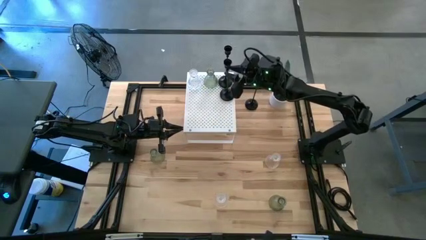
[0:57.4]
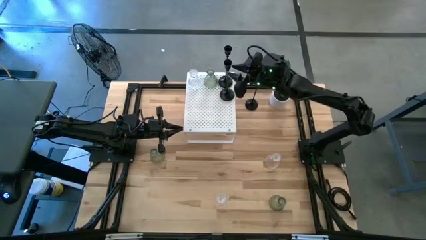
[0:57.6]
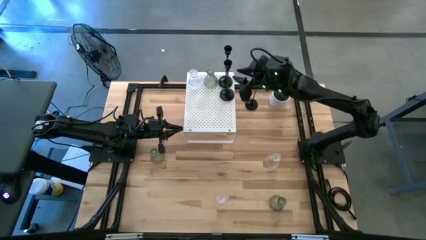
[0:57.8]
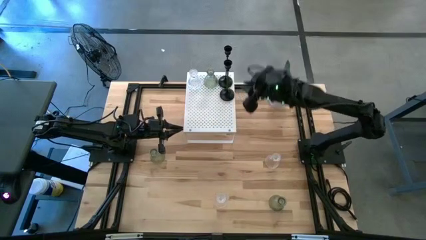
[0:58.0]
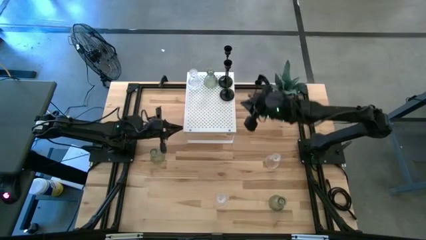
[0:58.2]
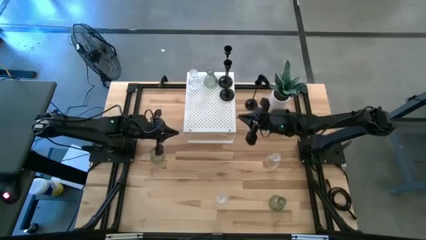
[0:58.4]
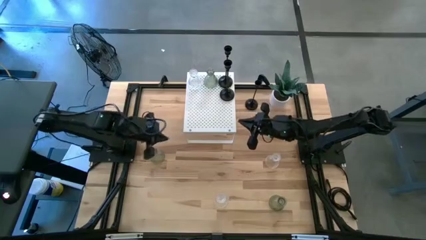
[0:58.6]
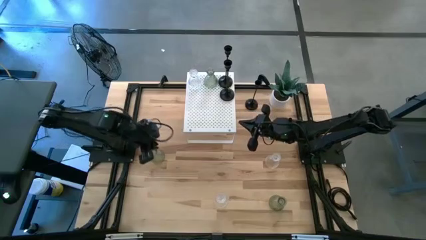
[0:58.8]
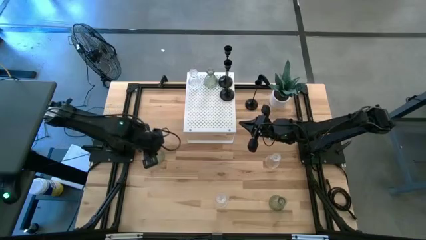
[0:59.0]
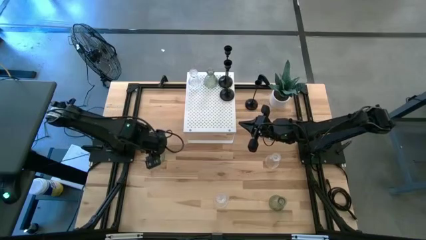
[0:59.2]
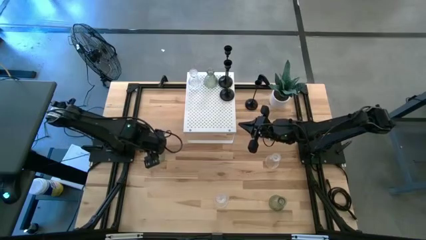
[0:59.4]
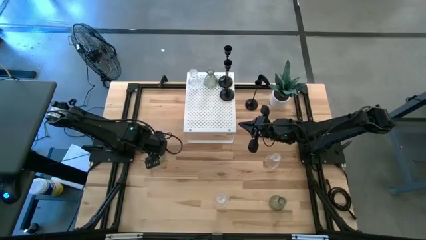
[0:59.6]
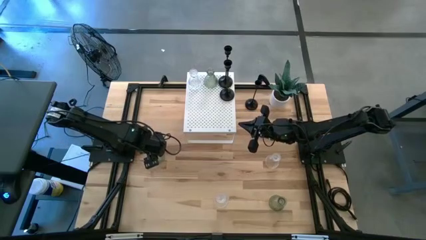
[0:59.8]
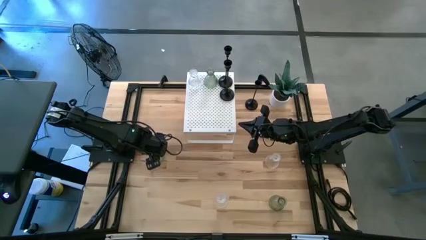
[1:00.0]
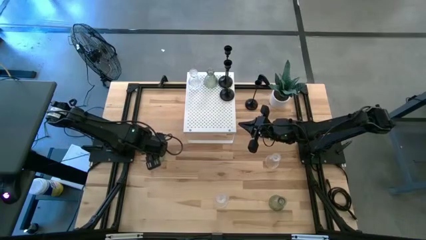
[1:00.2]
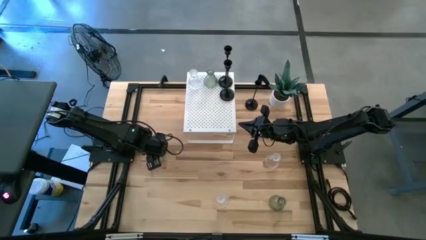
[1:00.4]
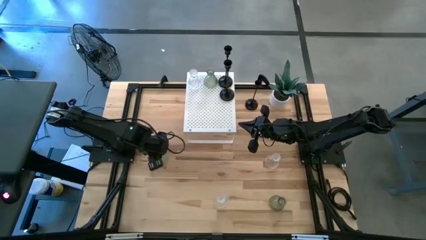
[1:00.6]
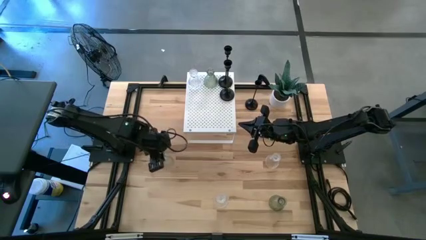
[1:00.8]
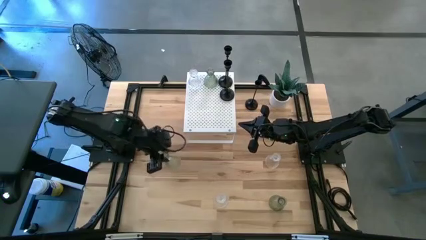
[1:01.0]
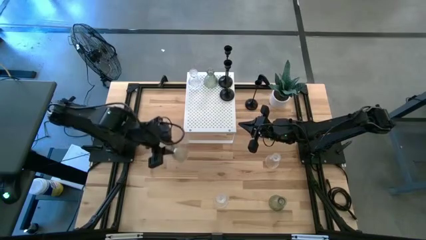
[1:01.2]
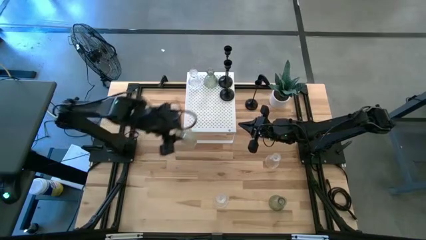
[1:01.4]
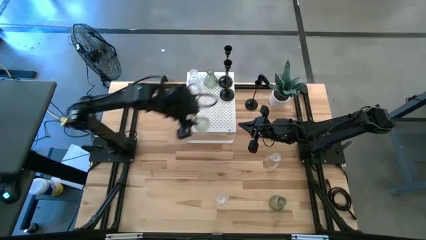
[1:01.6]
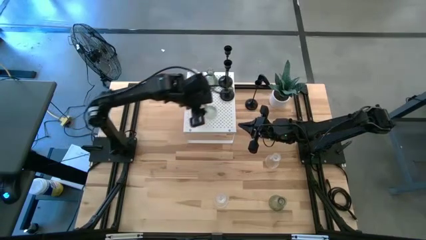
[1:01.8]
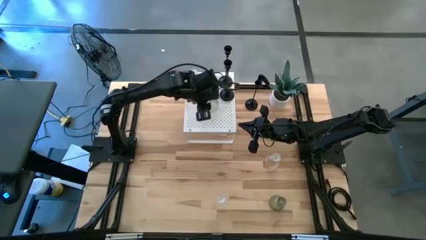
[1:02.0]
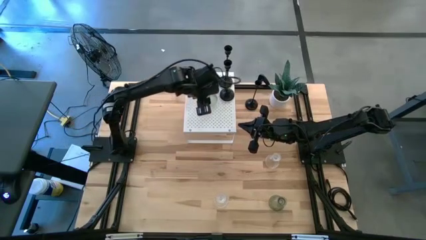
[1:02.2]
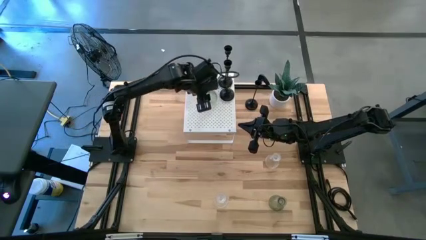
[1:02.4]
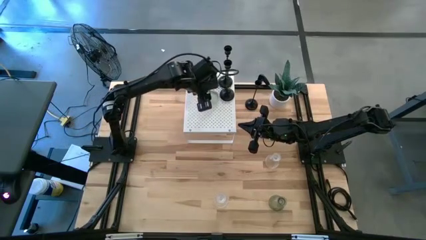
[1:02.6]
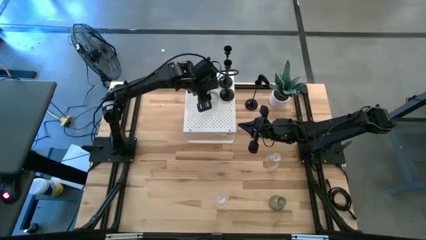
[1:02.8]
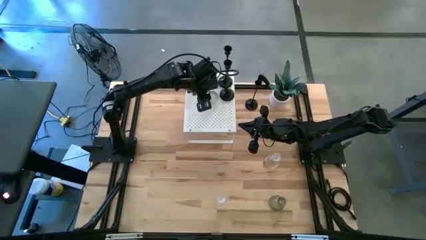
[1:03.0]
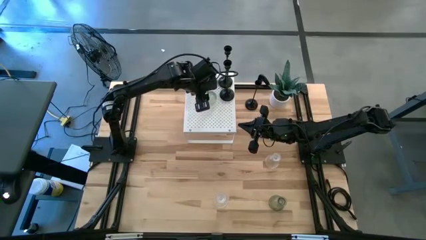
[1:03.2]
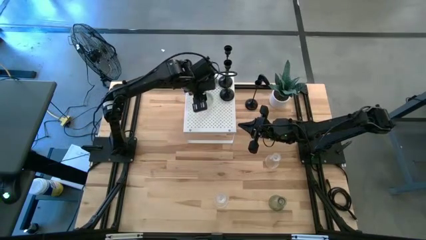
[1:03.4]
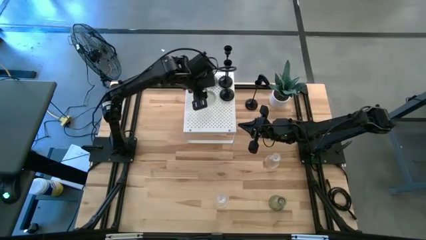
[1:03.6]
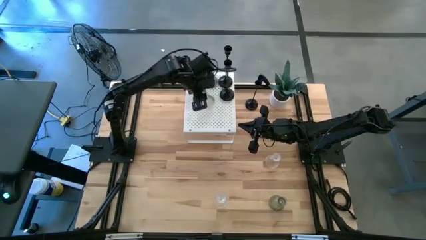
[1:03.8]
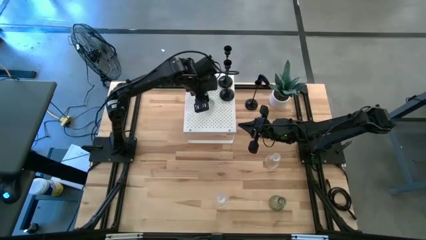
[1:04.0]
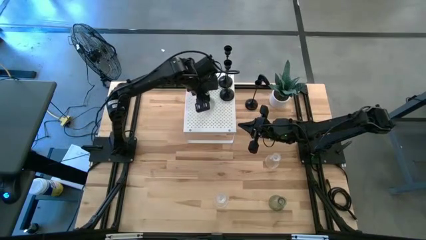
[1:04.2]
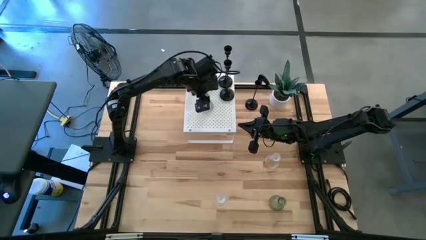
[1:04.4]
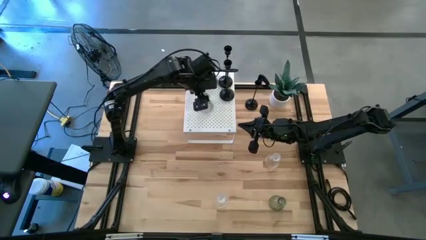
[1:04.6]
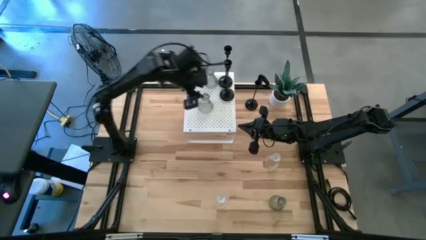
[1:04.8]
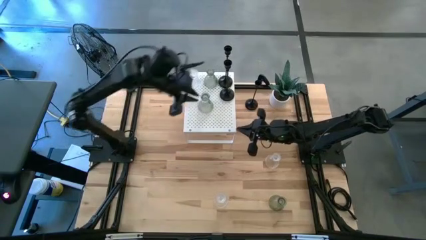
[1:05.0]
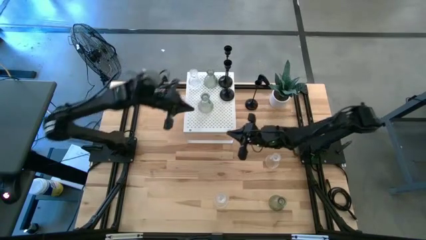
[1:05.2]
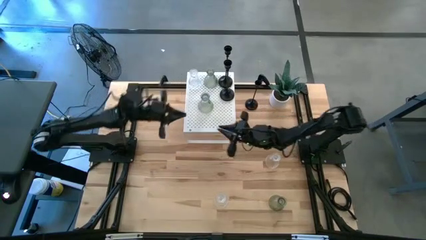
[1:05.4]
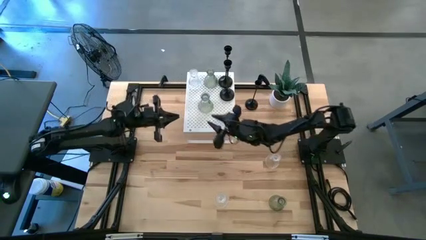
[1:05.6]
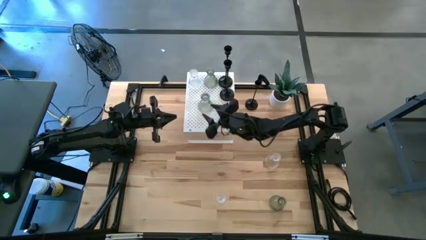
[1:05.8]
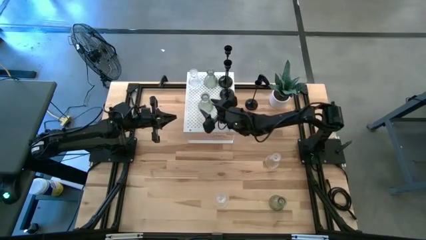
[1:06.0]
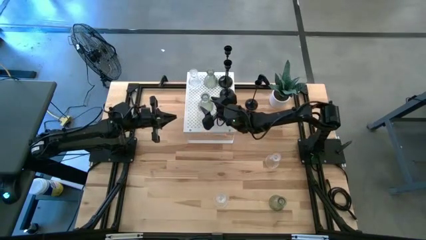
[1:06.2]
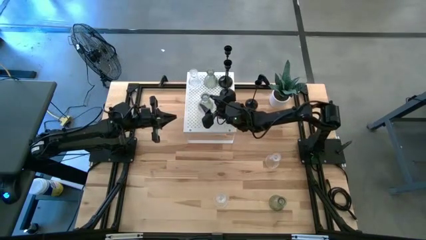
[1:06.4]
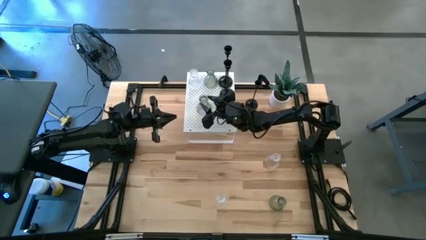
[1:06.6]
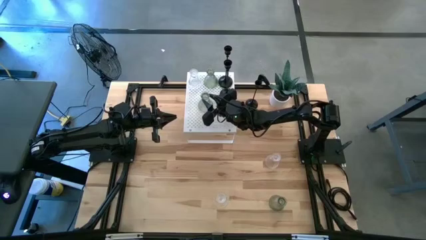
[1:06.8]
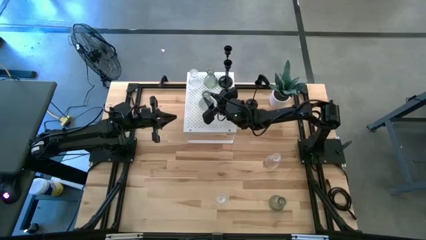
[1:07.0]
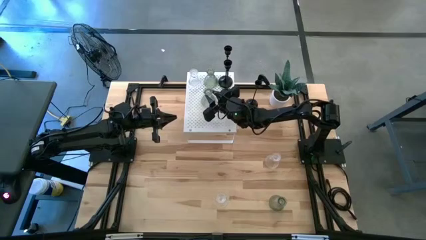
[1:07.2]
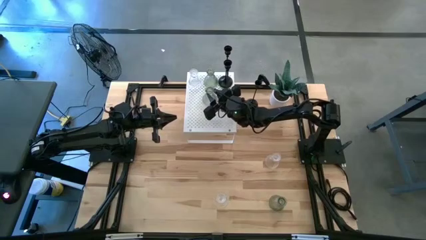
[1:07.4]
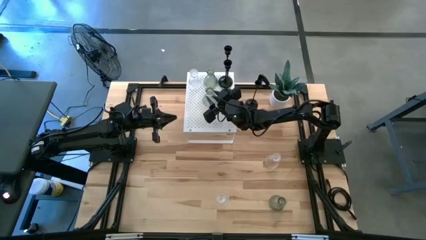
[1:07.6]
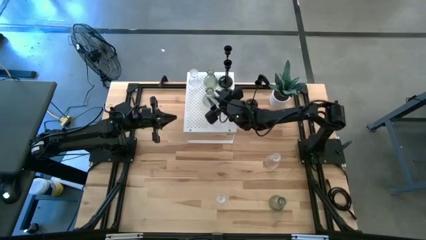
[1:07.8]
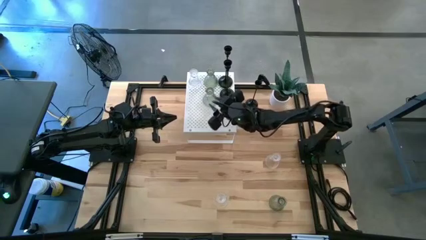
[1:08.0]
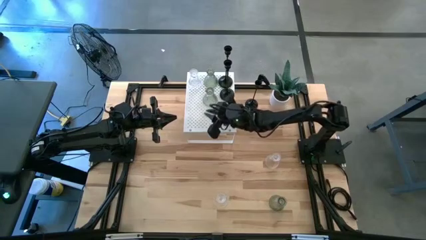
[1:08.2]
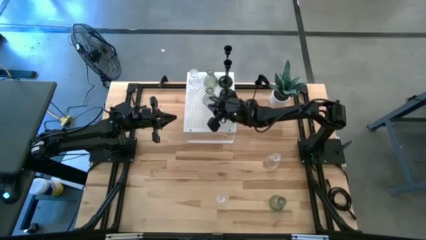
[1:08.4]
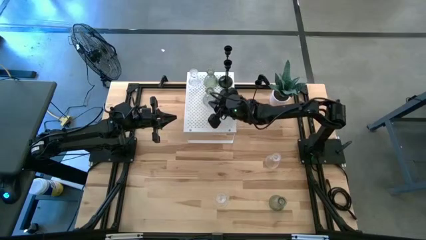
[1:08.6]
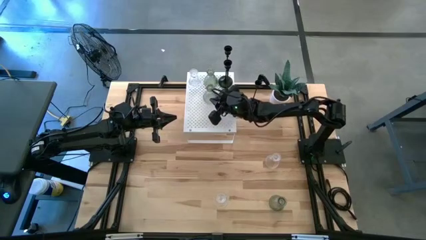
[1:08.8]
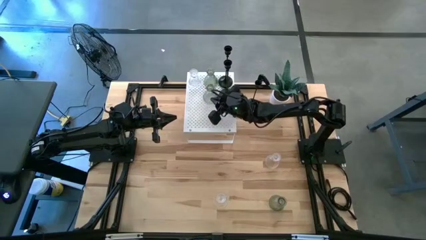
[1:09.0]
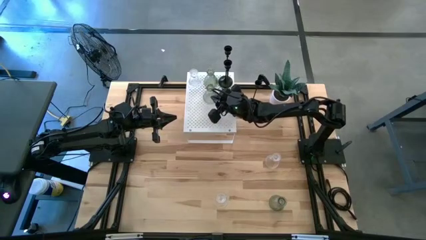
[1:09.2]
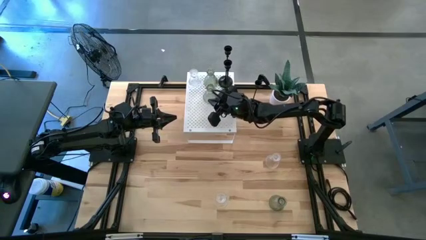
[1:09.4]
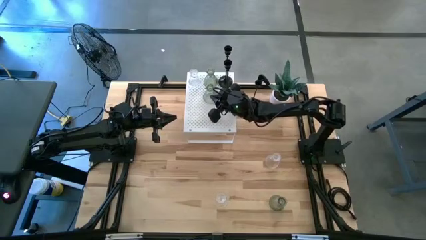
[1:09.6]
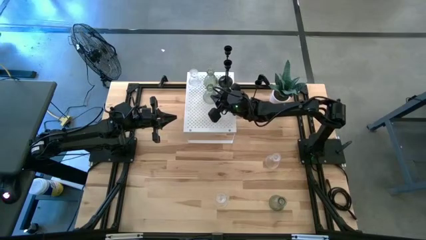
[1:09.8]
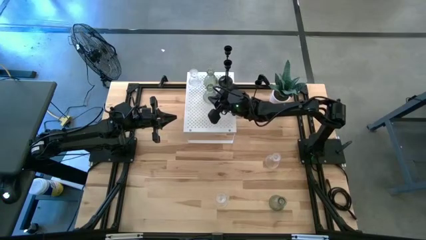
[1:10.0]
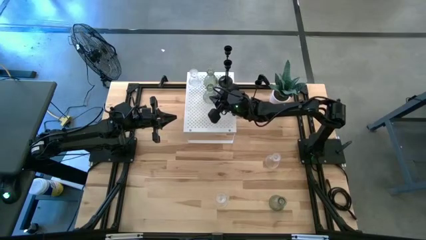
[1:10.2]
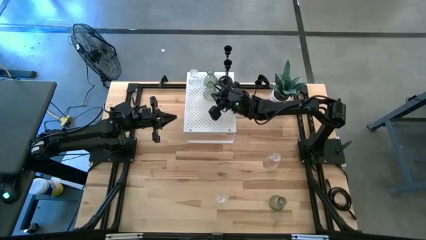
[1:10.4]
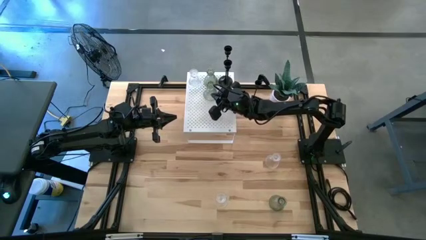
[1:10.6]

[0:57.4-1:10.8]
Task: Pick & Place candle stick holders
Put the top green glass candle holder on the shelf aligned with the other green glass candle holder
